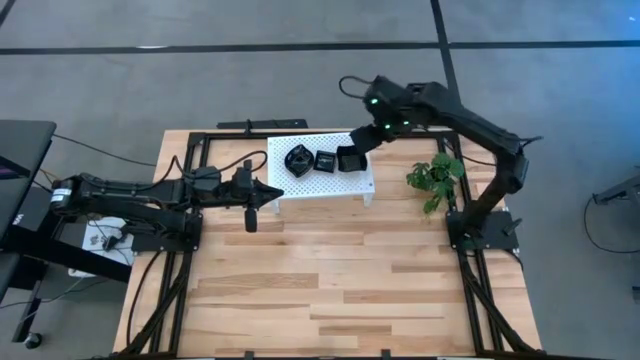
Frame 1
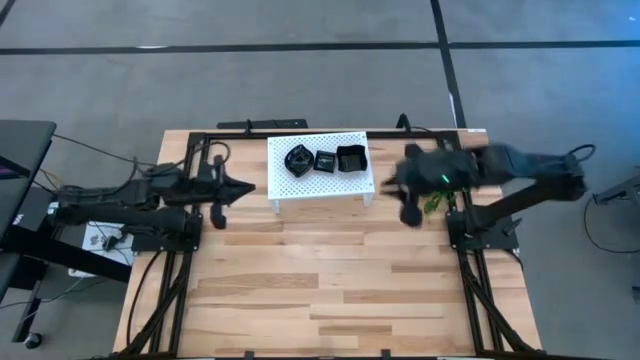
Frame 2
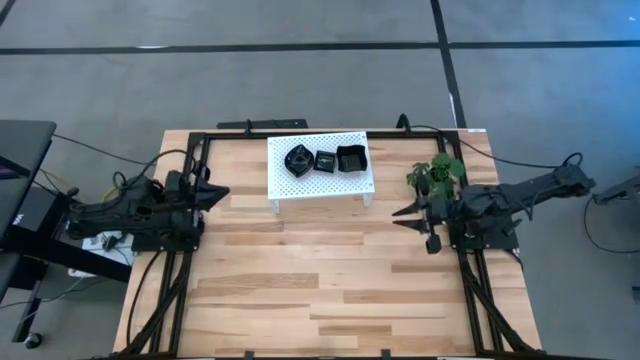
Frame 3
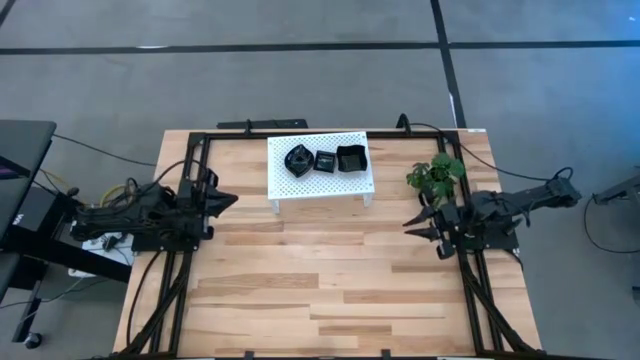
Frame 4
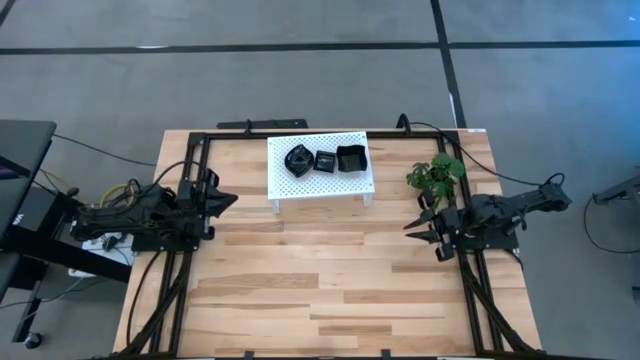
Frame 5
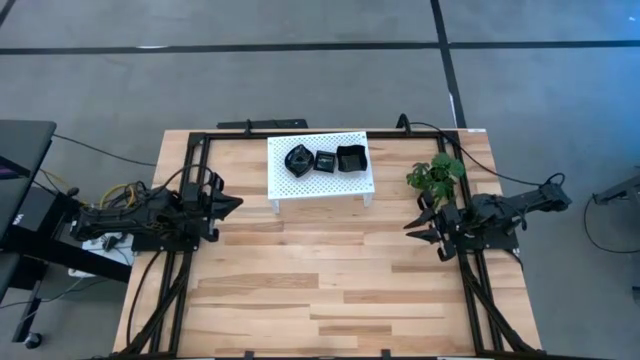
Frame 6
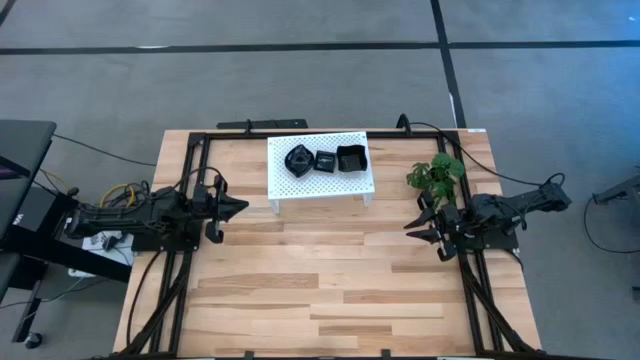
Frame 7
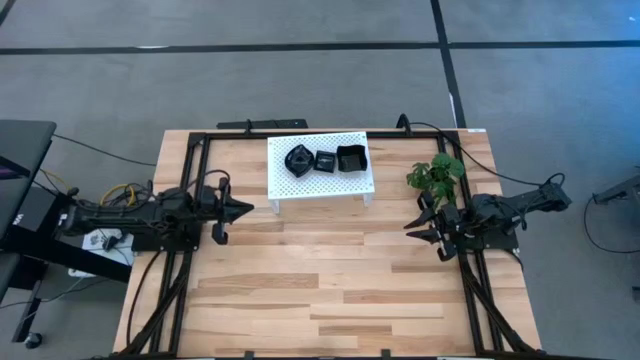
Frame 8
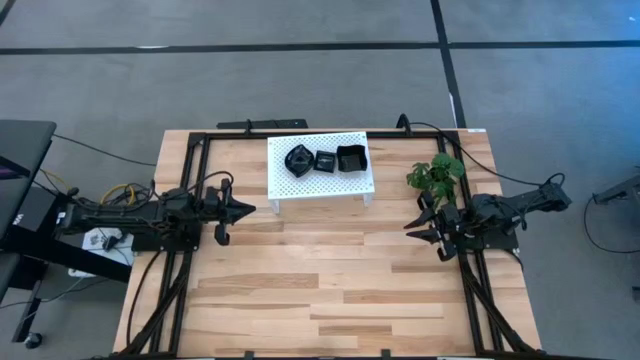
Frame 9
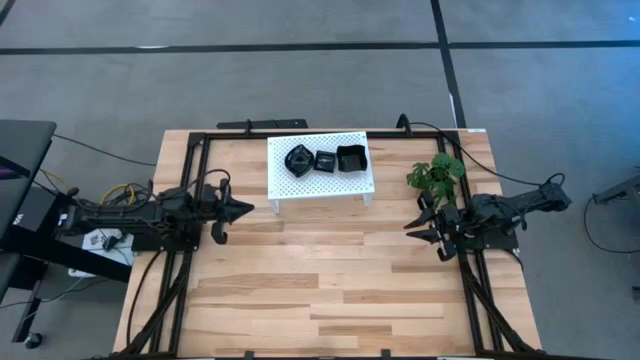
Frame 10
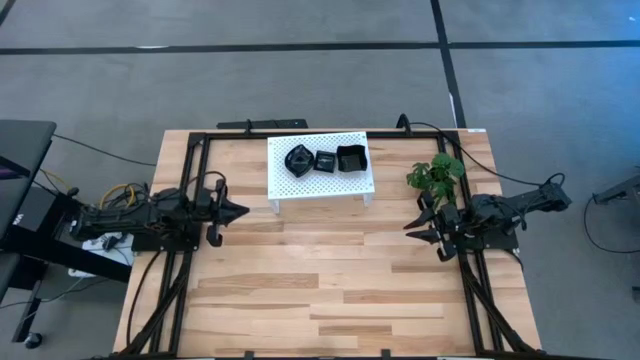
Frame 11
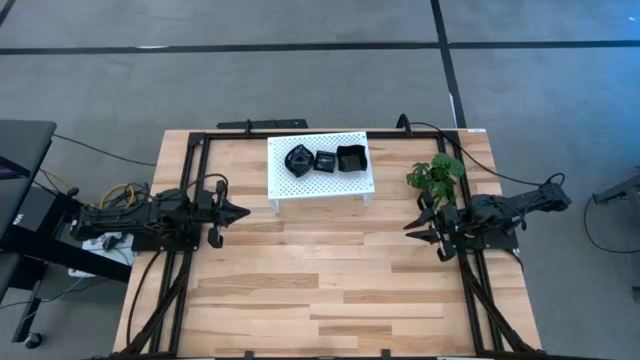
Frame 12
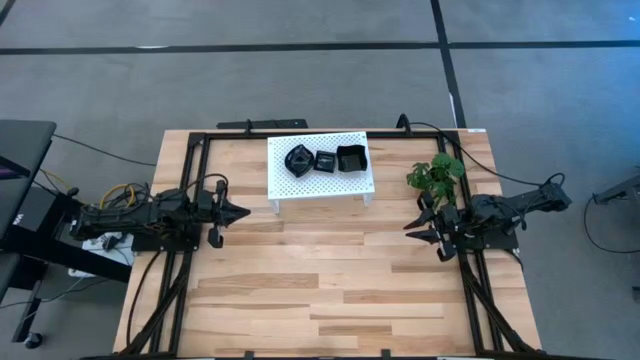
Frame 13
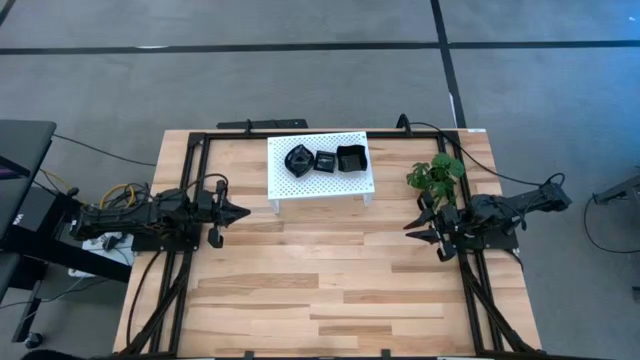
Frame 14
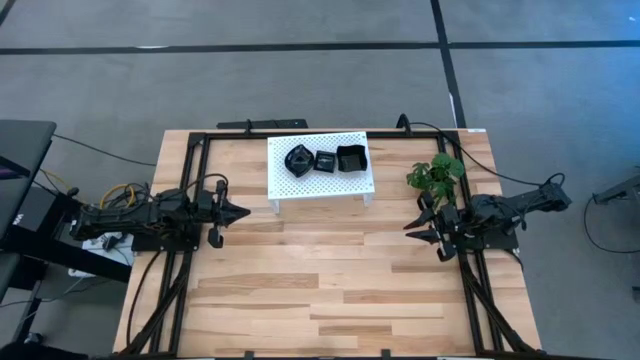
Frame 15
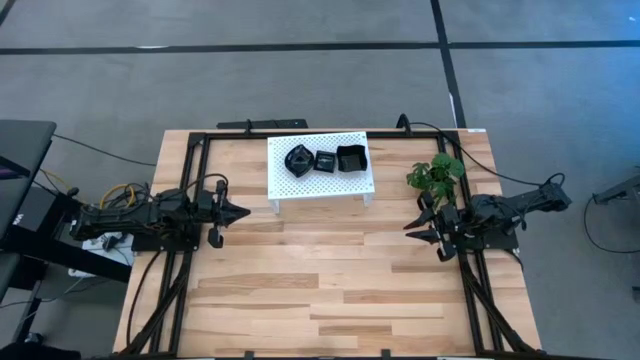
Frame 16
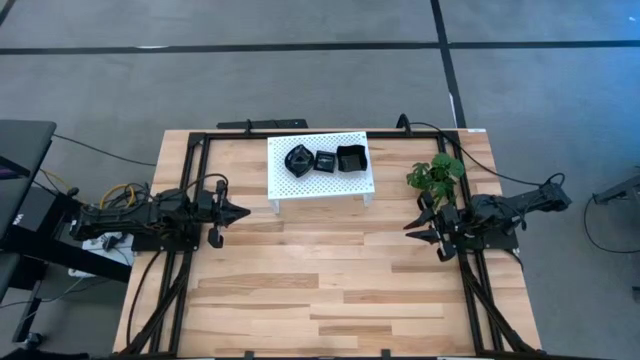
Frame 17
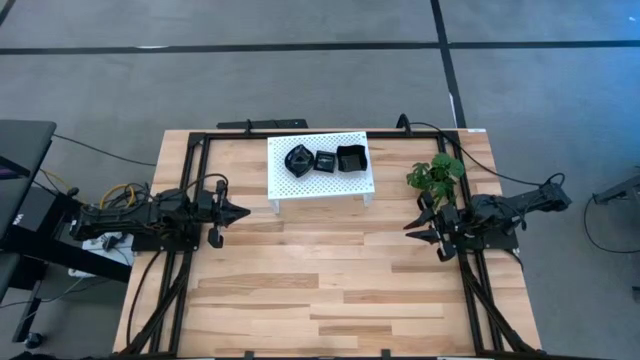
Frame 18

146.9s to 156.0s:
Task: Pick & Place Mini shaped plates
Return to Home Position

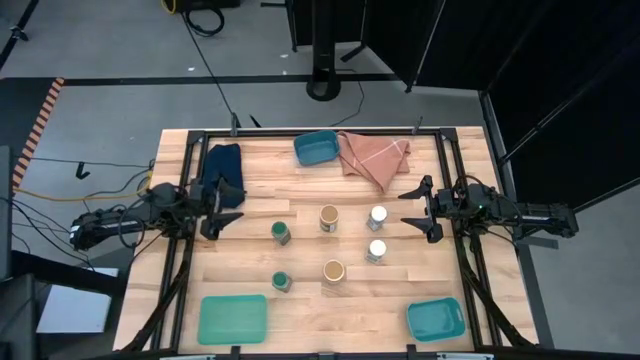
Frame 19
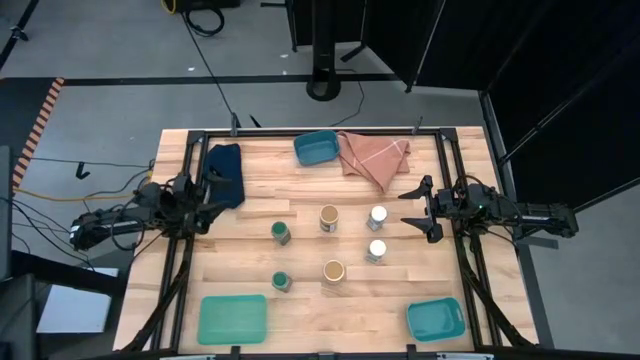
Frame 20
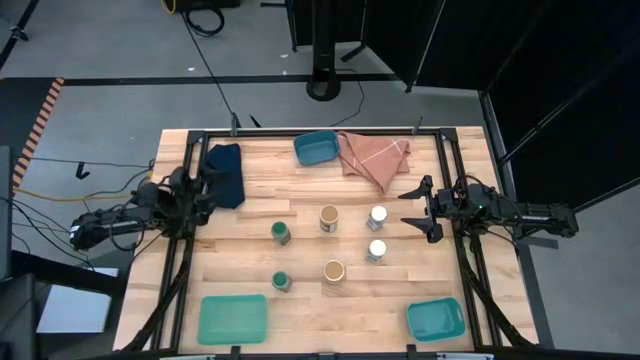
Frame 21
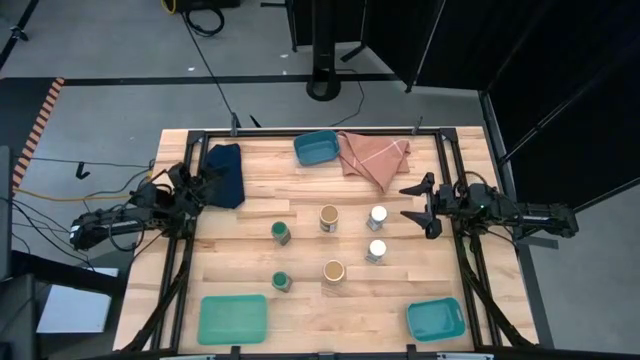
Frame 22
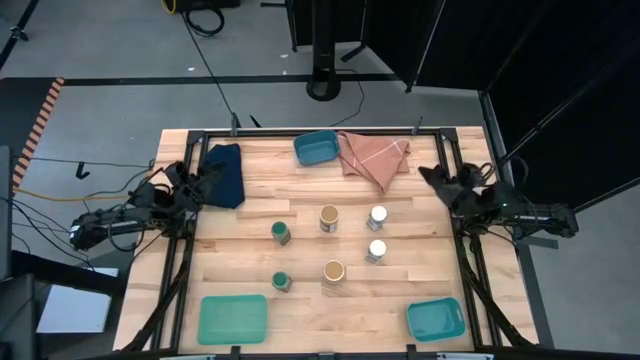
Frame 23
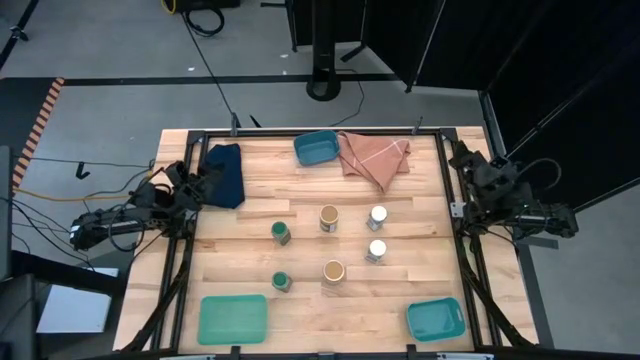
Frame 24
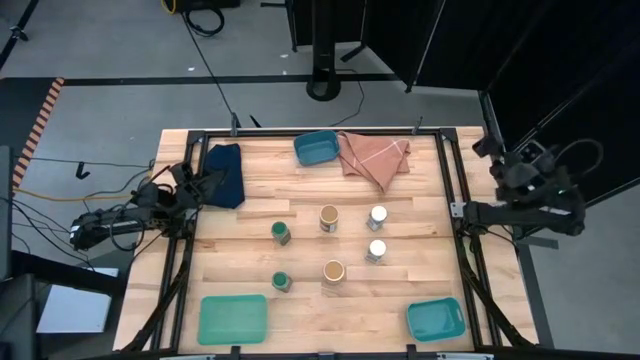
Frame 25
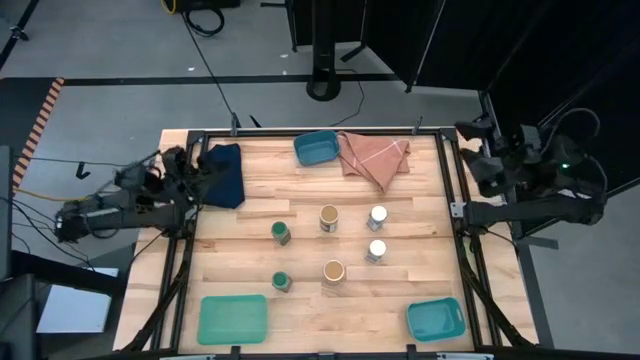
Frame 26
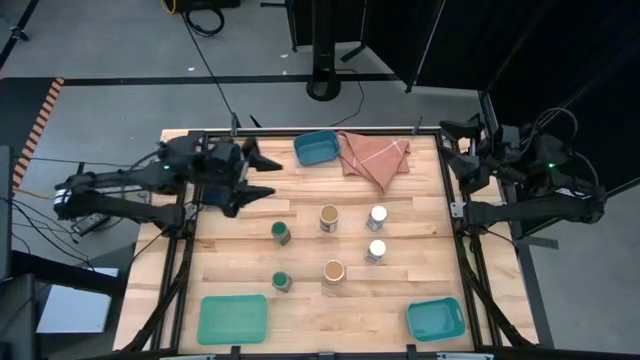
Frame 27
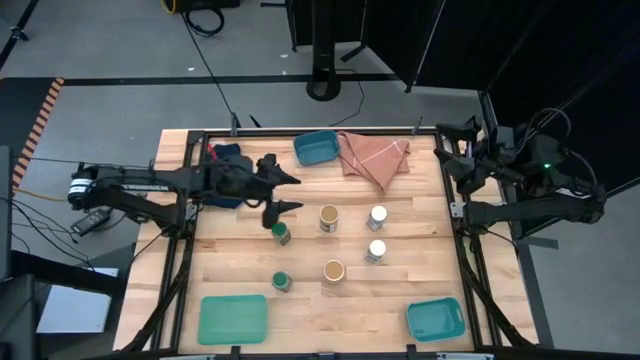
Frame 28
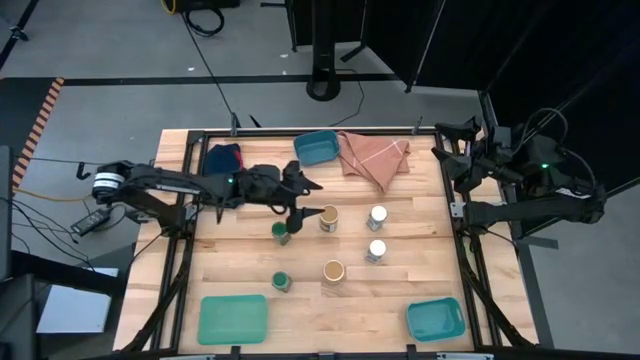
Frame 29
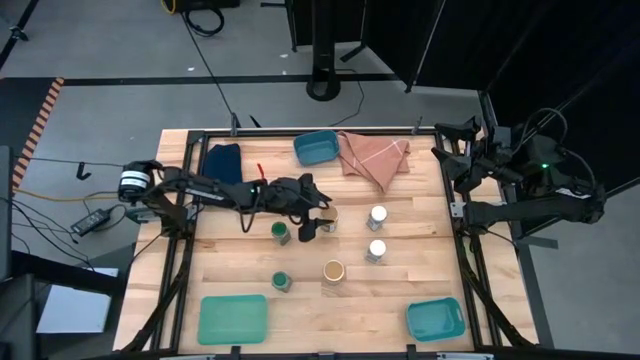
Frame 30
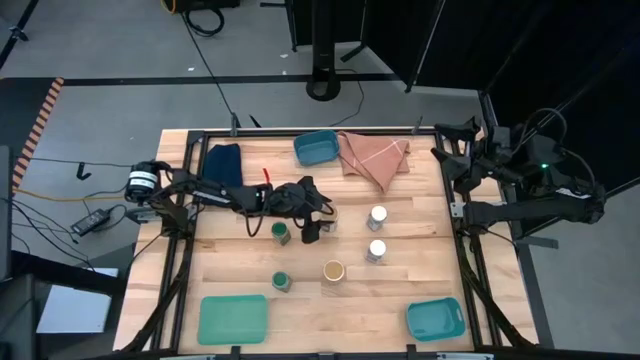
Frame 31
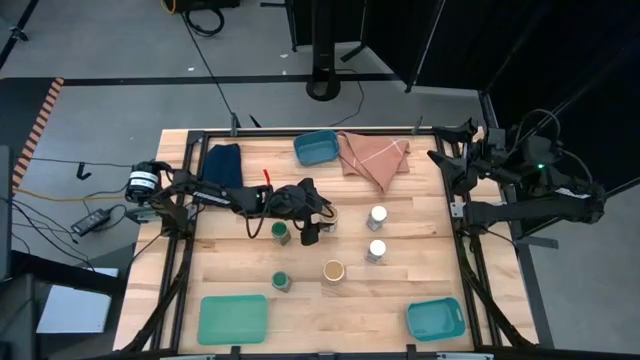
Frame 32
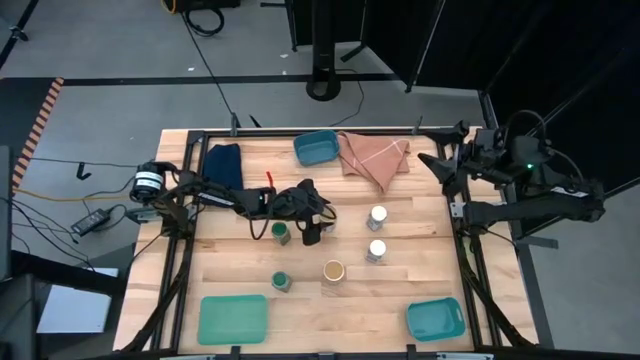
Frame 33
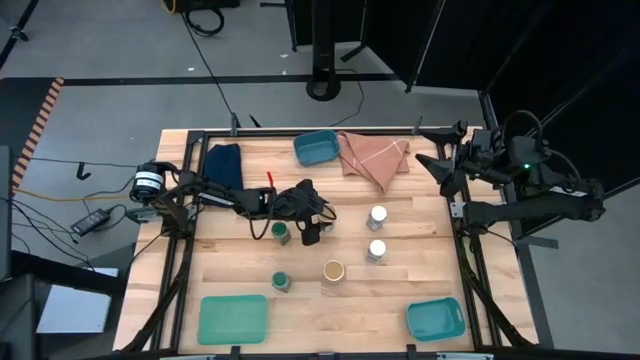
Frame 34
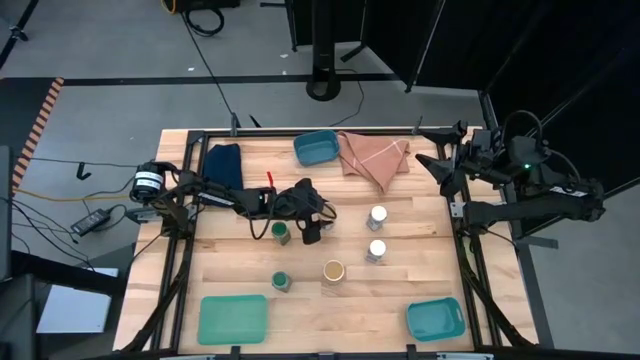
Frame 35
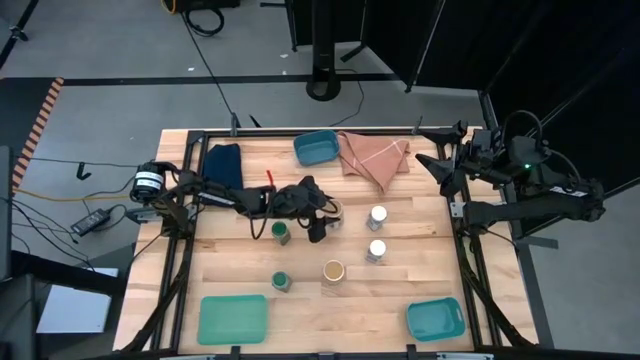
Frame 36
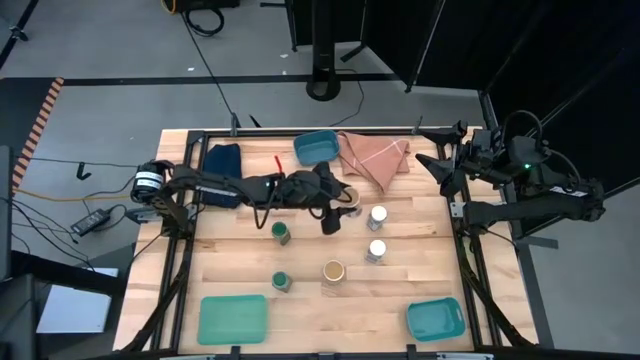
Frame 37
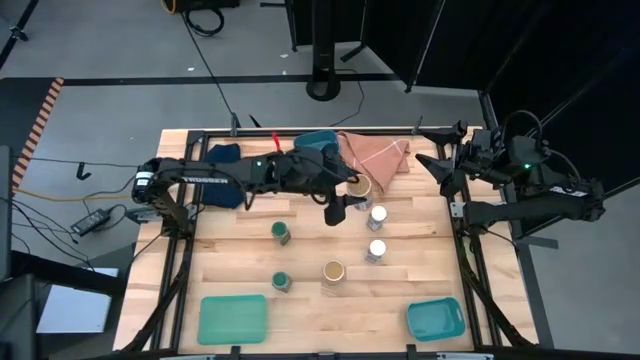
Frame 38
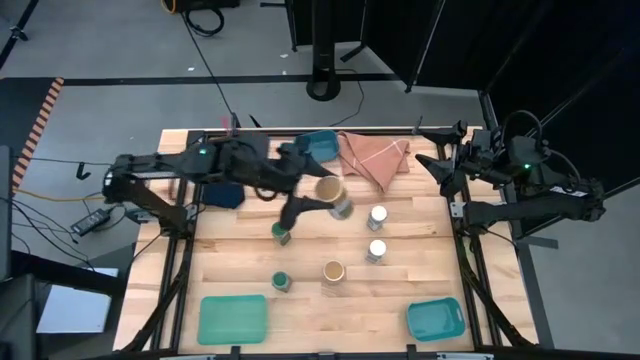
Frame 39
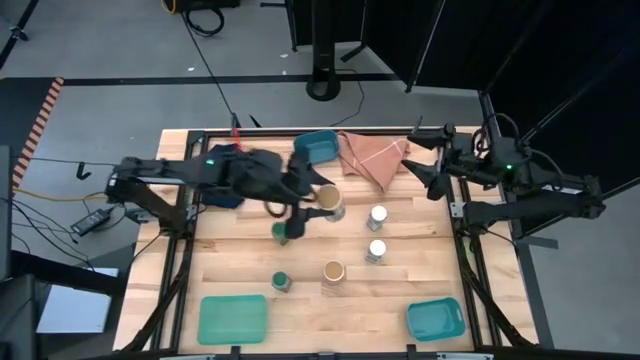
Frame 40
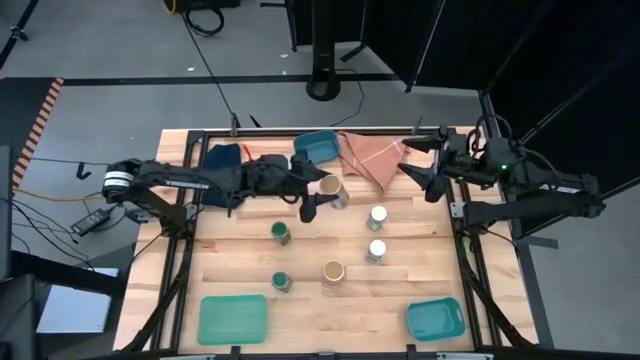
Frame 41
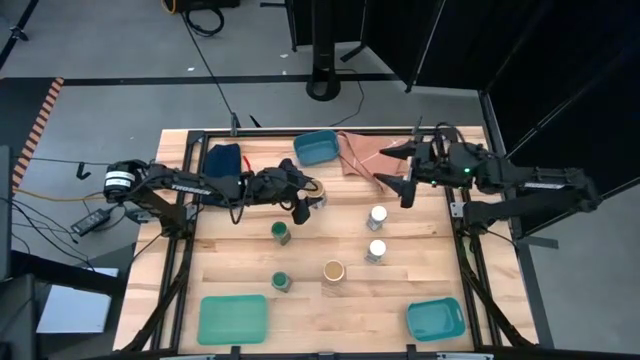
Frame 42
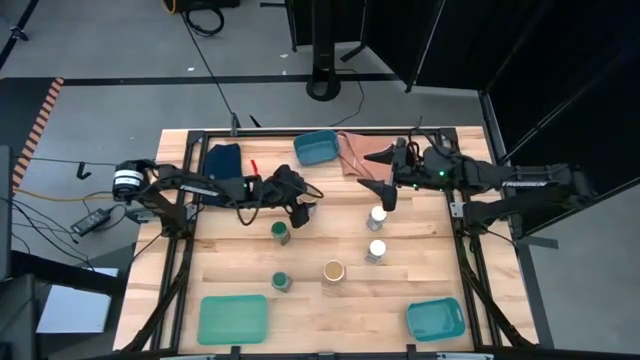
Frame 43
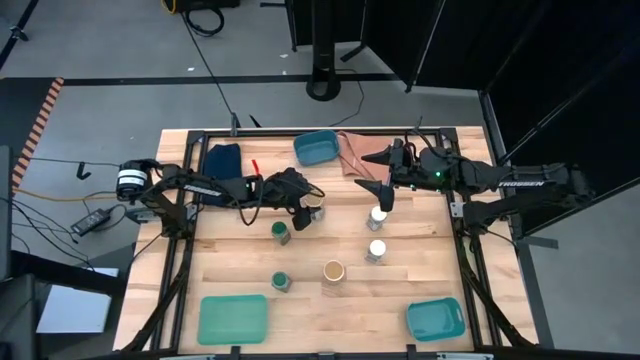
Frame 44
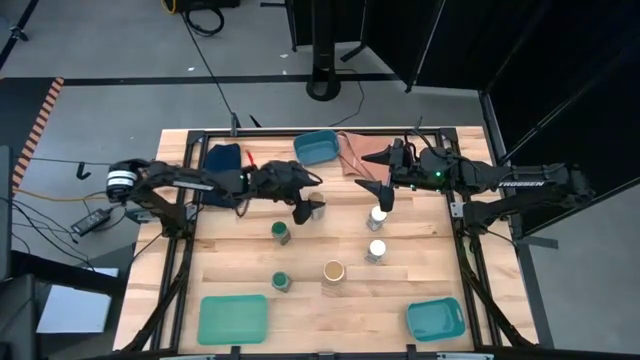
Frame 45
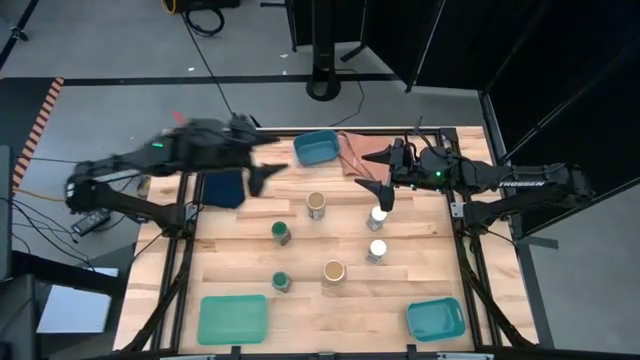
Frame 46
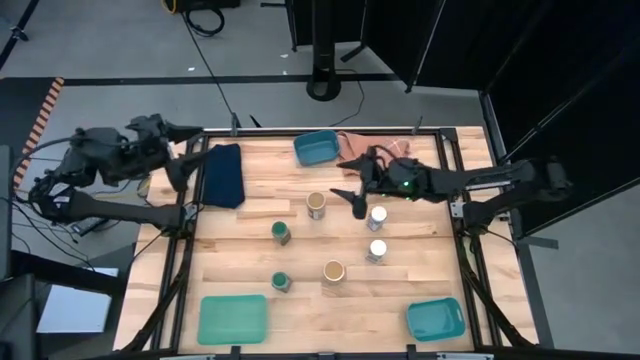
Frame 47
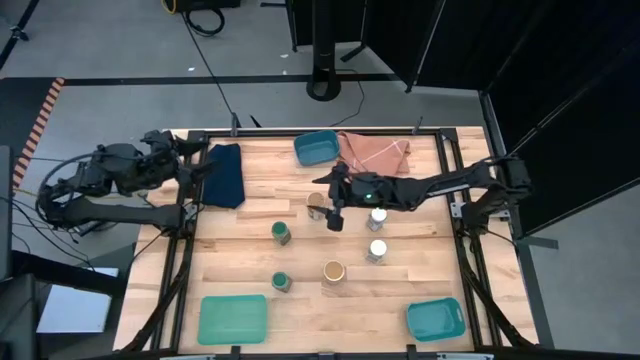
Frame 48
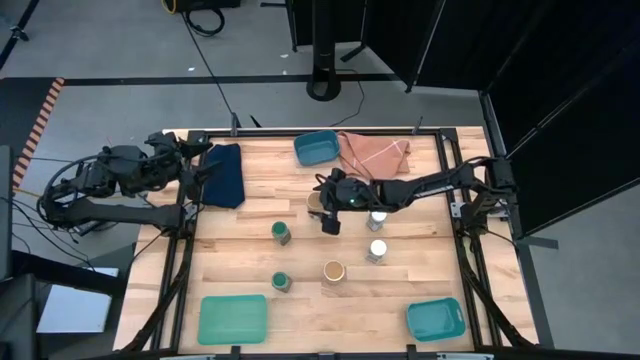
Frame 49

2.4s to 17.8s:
Task: Sort spices by type
Put the top brown seasoning bottle into the light green bin
